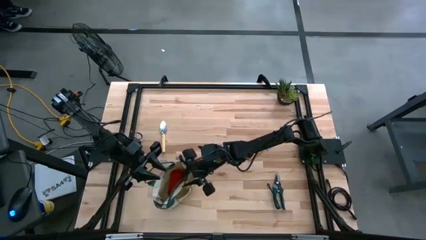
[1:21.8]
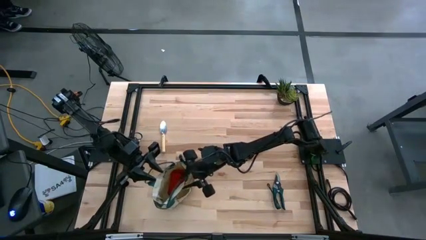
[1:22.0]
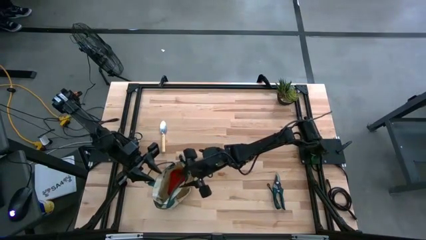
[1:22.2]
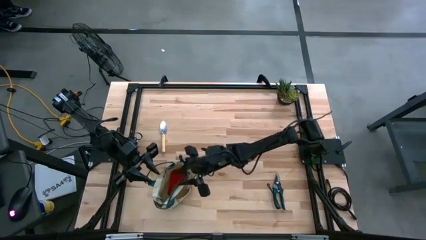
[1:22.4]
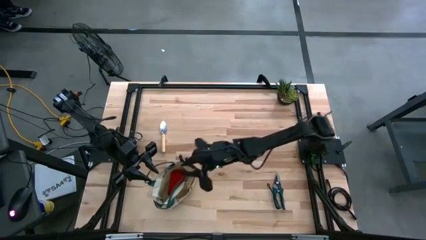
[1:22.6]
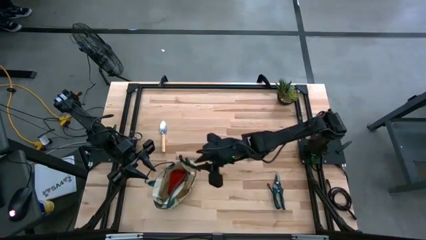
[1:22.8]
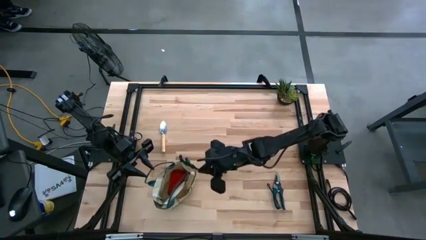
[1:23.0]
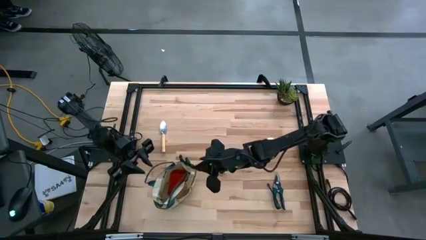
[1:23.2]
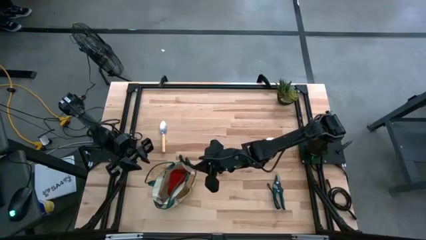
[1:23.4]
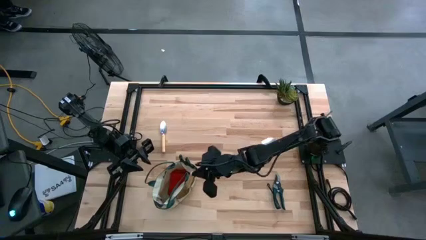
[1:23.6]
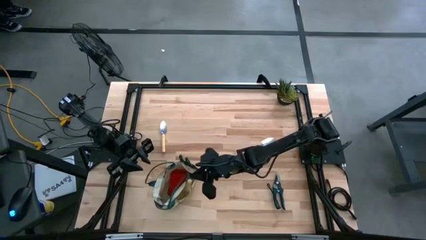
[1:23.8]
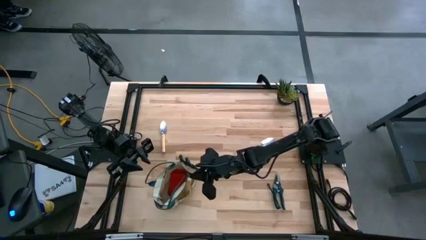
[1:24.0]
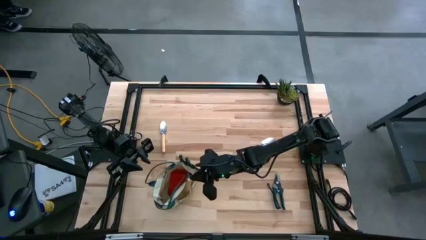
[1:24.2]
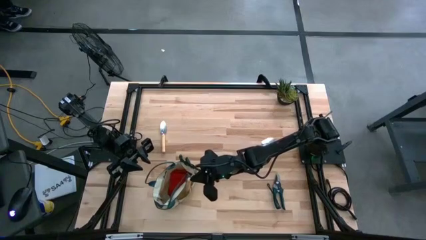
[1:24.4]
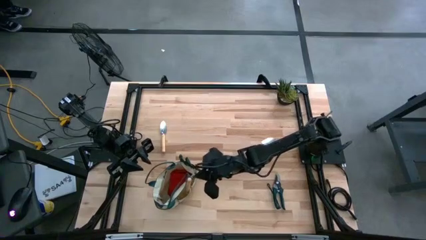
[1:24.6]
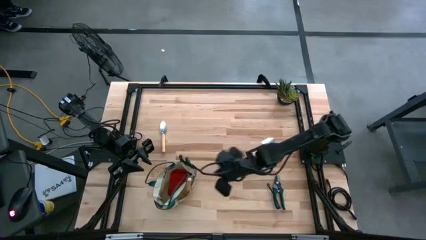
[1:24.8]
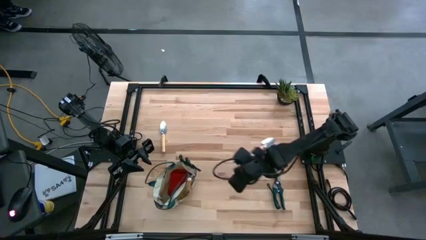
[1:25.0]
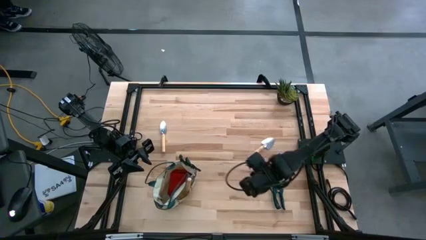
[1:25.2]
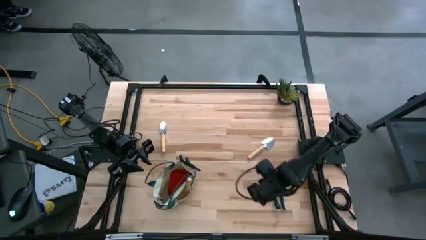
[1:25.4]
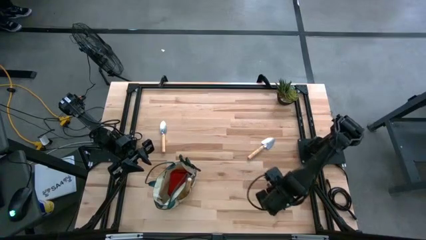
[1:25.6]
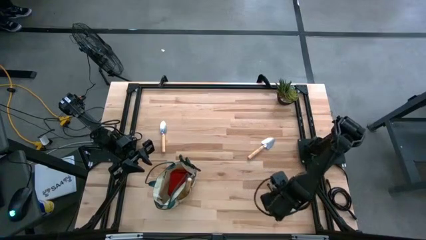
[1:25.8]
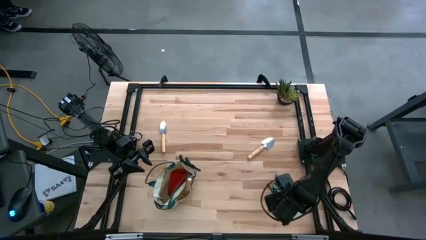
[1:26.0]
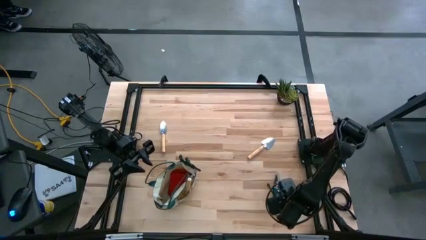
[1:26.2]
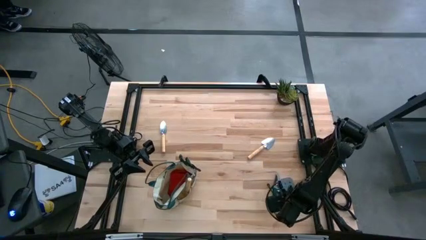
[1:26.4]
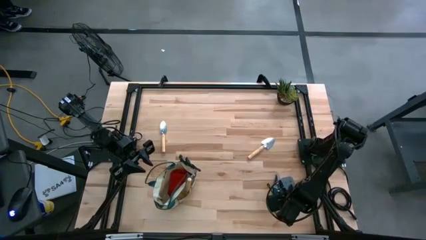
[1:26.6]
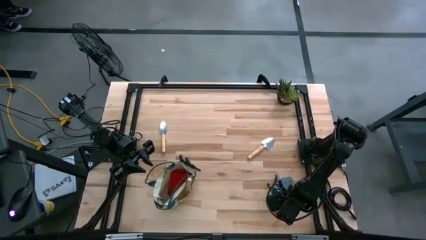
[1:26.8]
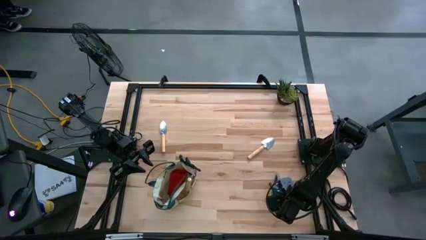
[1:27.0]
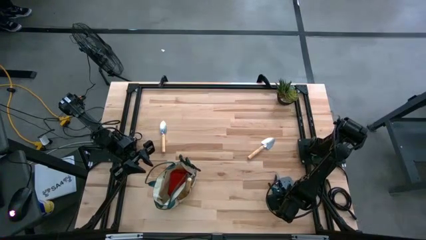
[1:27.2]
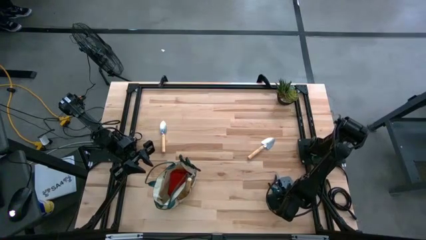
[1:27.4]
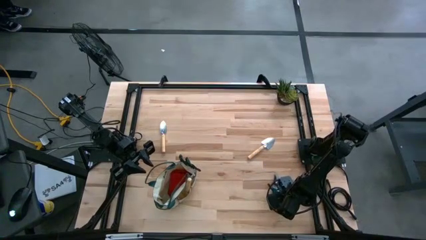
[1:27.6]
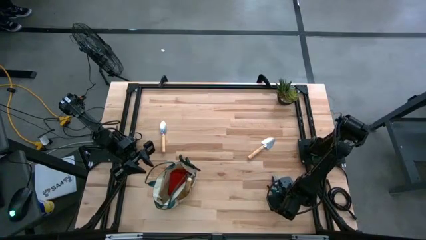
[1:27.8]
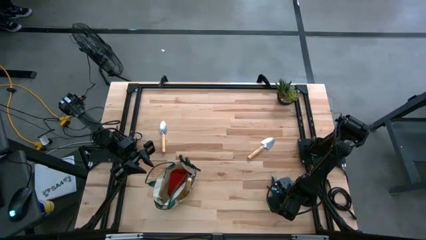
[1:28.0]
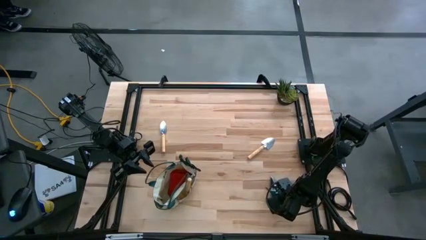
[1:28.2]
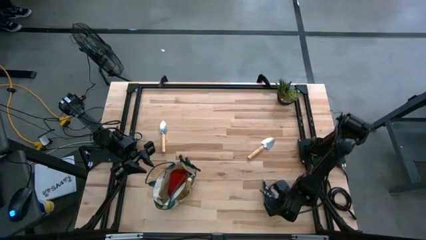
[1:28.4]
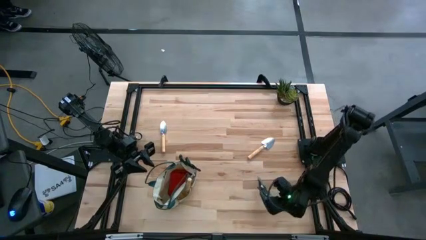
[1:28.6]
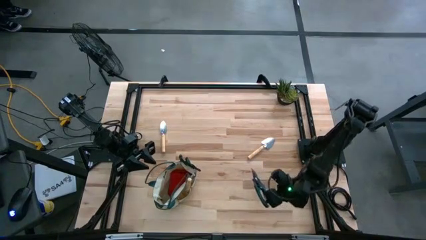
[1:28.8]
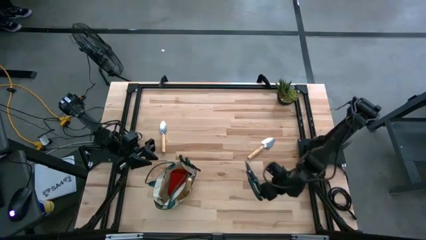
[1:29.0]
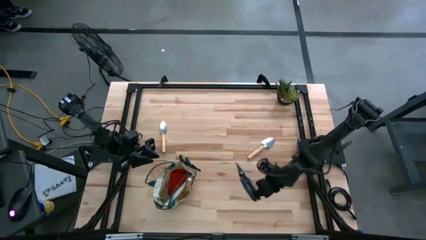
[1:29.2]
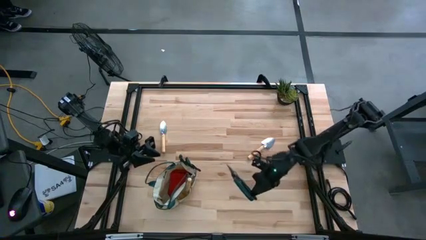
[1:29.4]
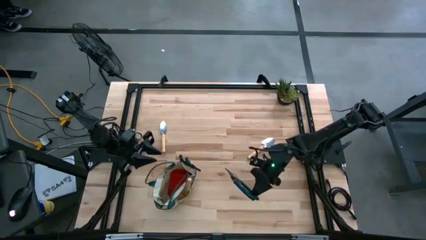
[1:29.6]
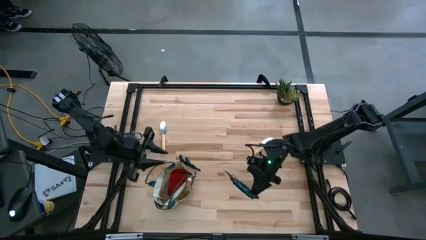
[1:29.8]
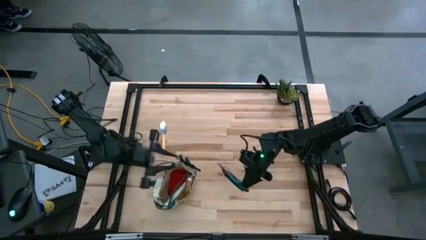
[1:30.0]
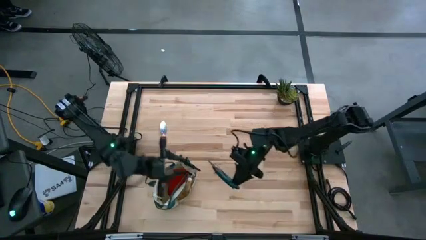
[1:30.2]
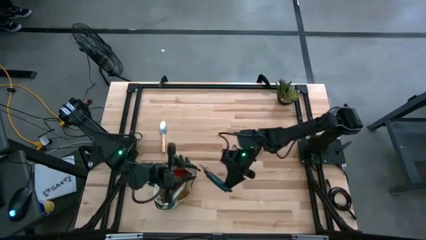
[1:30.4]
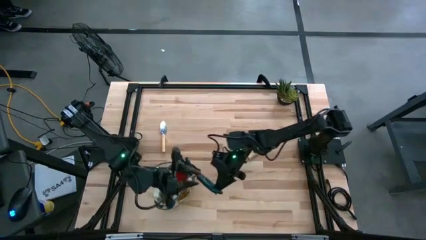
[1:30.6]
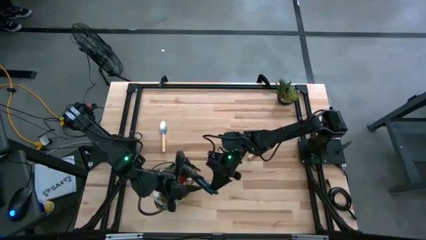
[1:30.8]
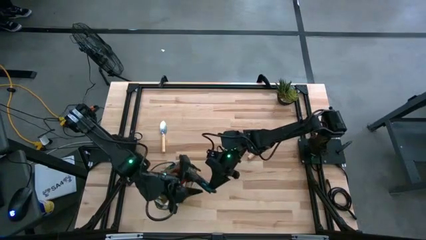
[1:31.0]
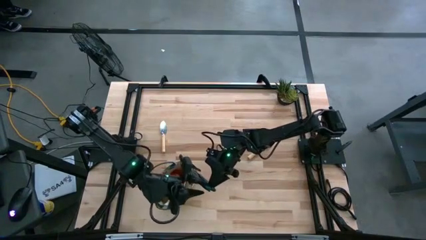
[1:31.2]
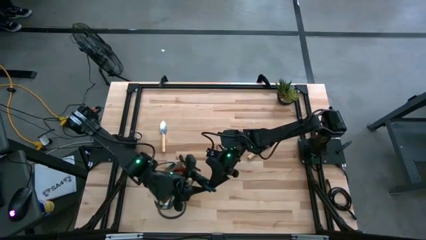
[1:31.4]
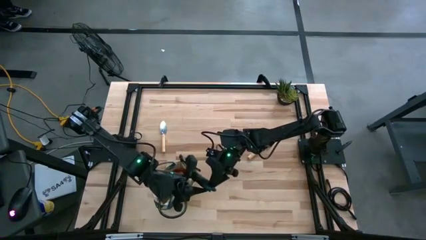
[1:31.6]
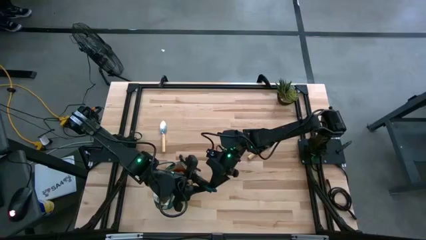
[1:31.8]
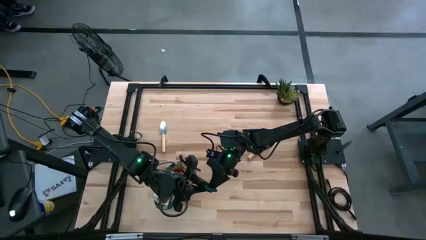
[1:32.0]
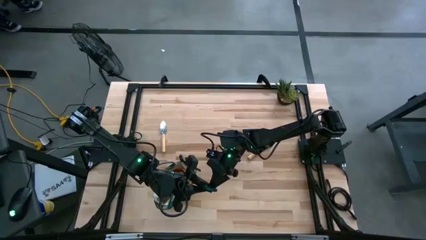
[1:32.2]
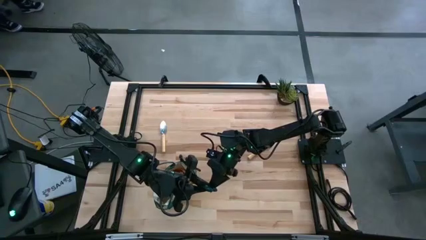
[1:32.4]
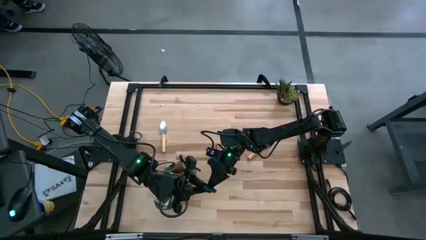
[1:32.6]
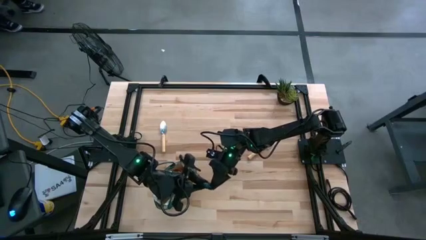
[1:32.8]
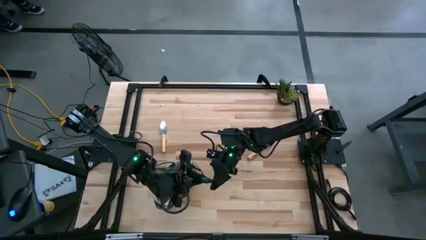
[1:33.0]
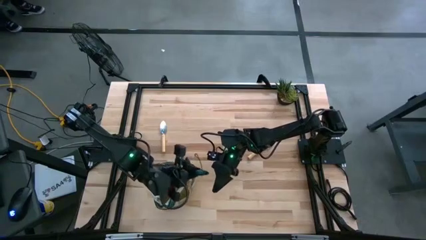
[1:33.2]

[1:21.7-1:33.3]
Task: Pick & Place Garden tools in Gardening bag
Put the shear scissor into the gardening bag

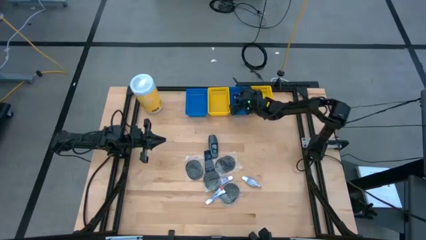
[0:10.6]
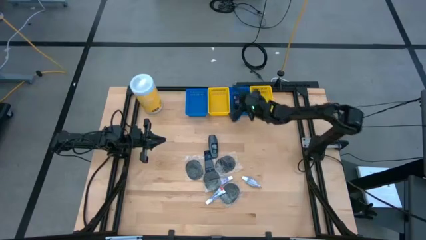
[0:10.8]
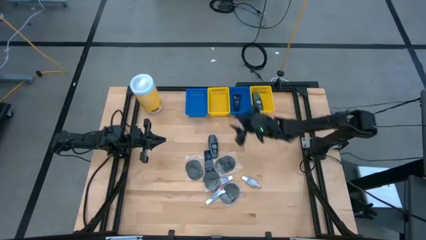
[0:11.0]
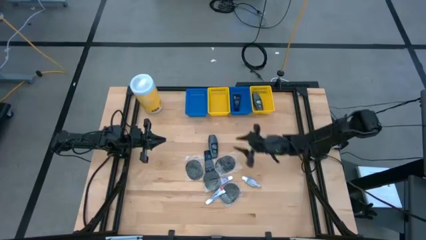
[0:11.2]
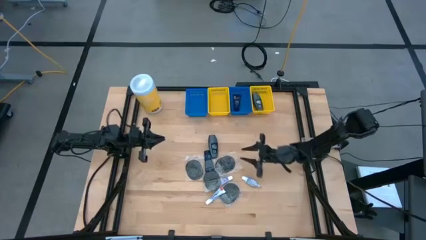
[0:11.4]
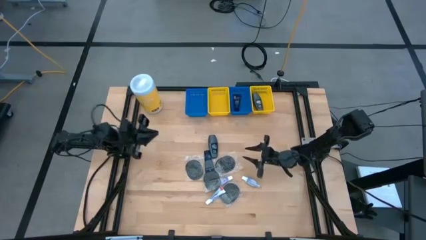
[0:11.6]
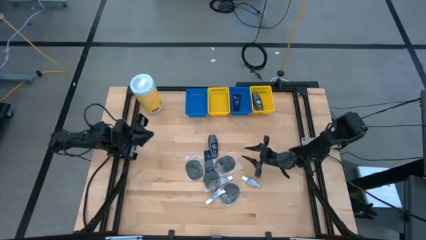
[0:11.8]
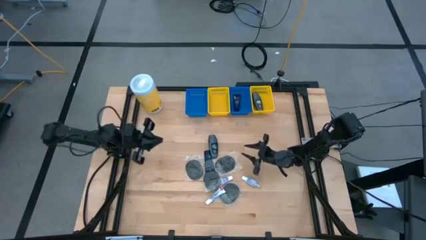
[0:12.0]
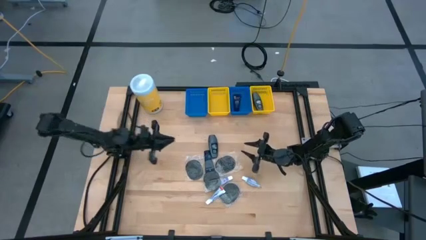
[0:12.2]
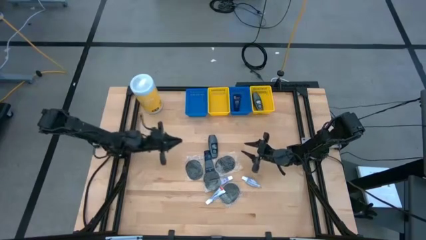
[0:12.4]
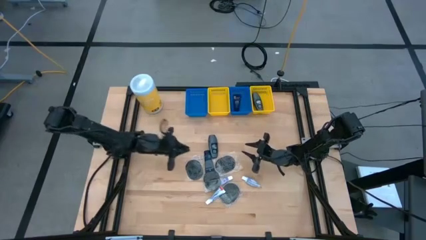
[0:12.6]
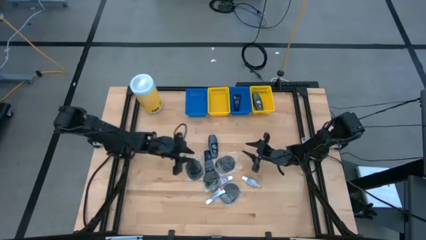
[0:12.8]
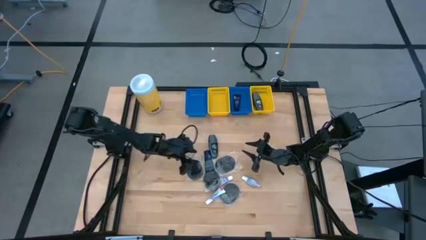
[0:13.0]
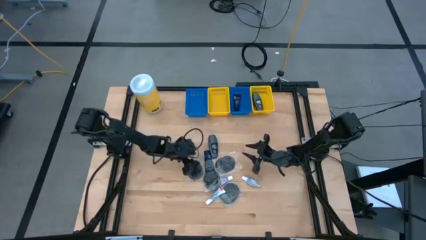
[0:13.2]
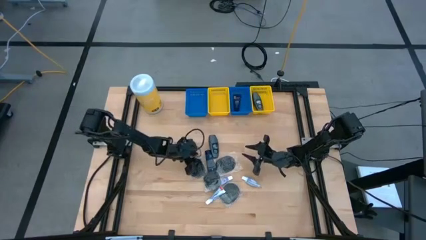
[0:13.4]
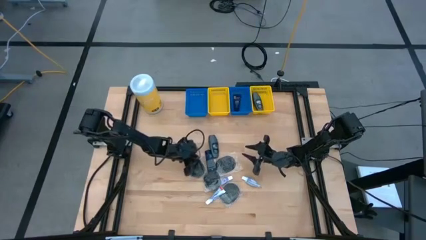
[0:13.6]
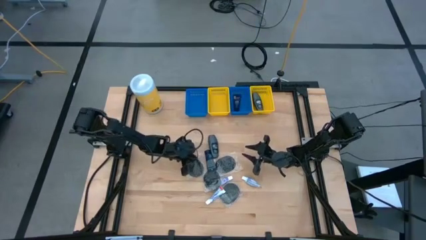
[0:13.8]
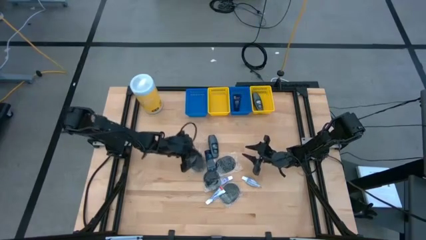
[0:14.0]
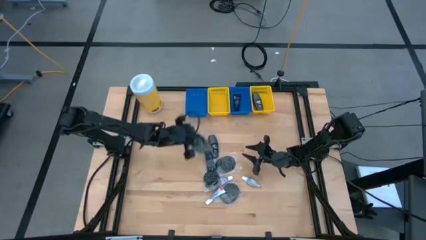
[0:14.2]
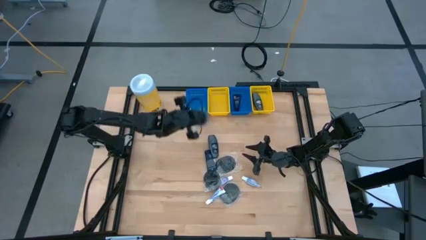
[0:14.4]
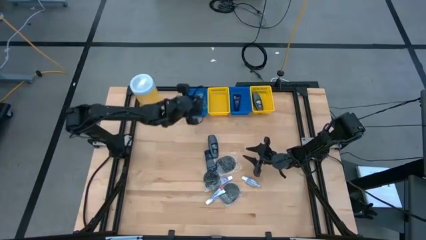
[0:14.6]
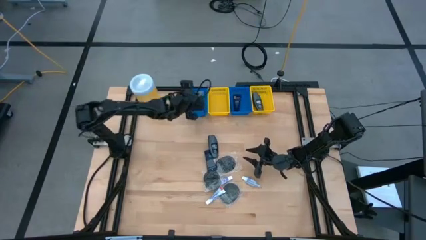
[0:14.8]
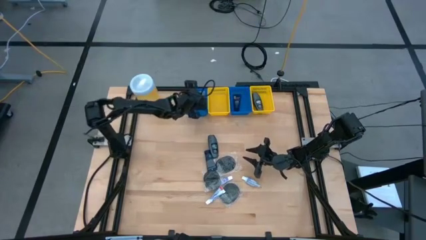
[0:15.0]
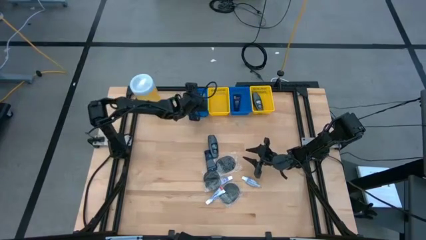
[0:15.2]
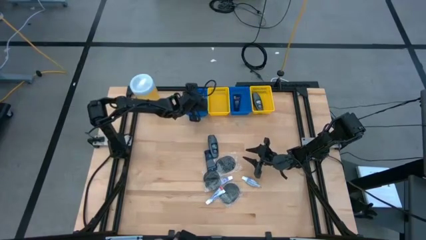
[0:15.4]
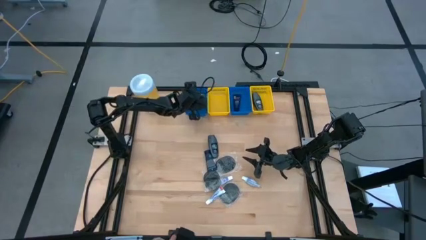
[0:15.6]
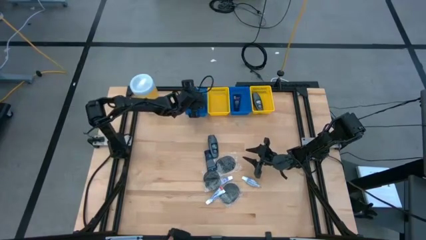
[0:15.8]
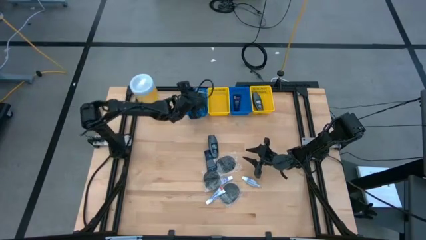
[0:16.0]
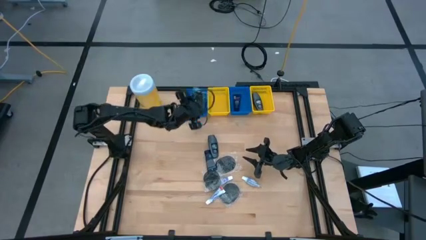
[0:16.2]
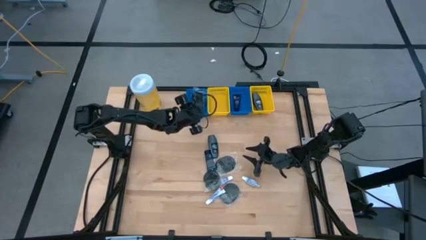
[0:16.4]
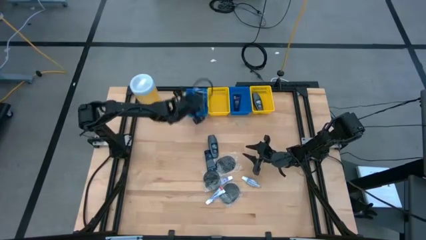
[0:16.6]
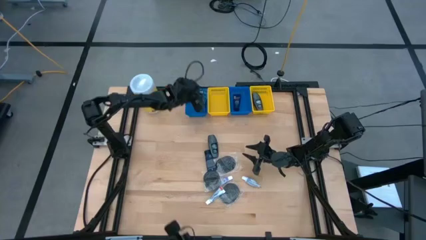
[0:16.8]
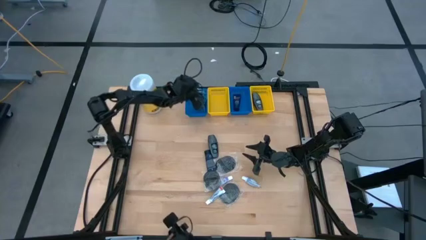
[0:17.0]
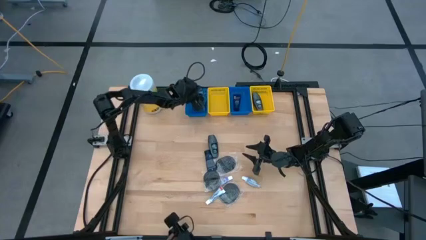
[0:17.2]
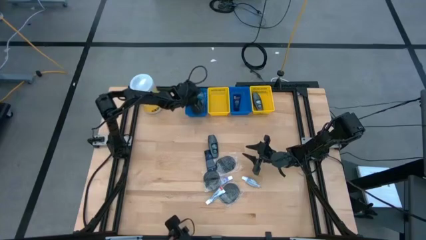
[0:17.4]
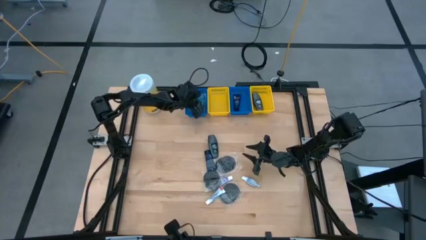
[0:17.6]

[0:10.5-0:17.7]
Task: Pick & Place Travel size toiletries
Put the black comb into the left blue bin
